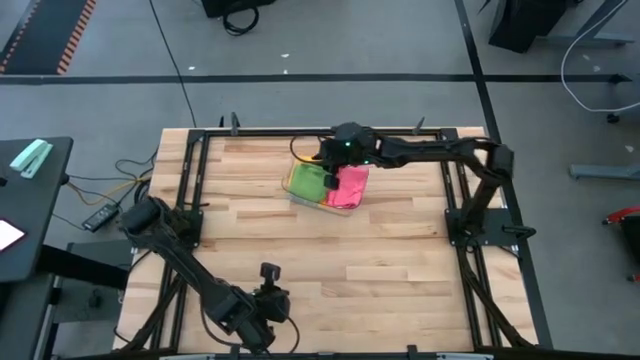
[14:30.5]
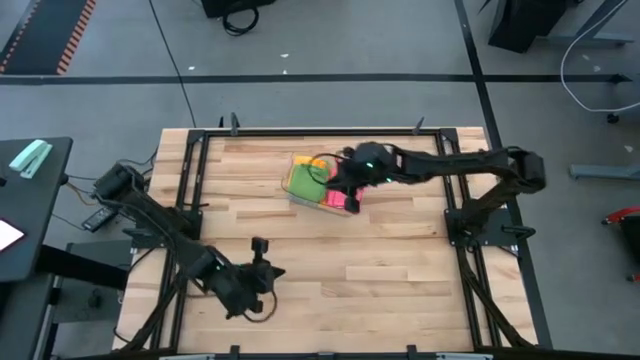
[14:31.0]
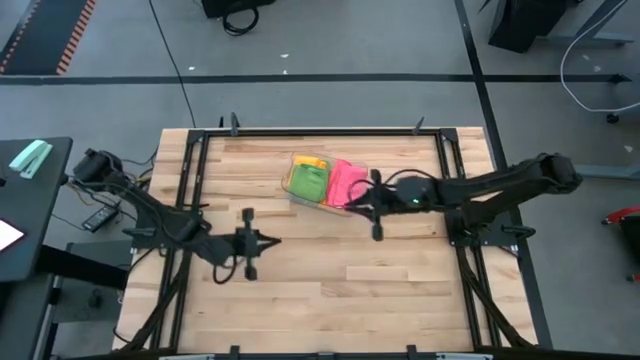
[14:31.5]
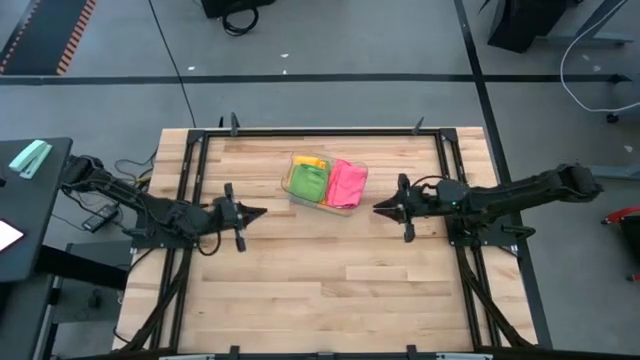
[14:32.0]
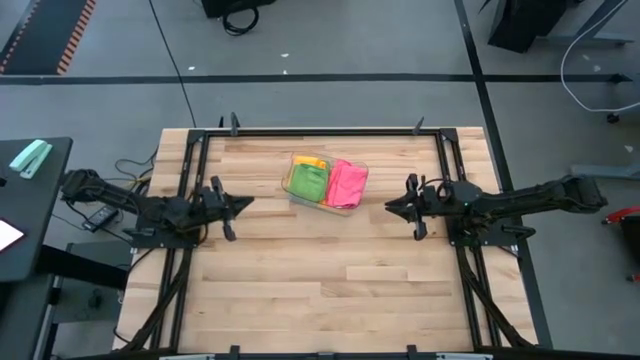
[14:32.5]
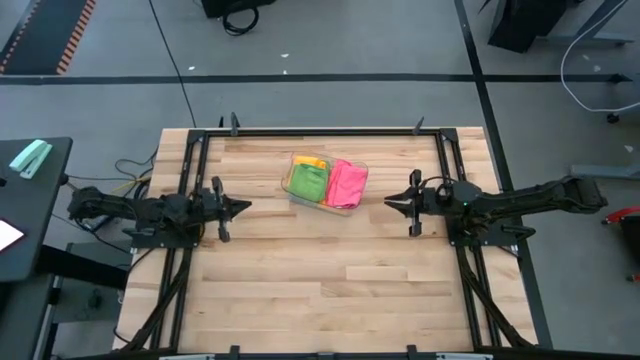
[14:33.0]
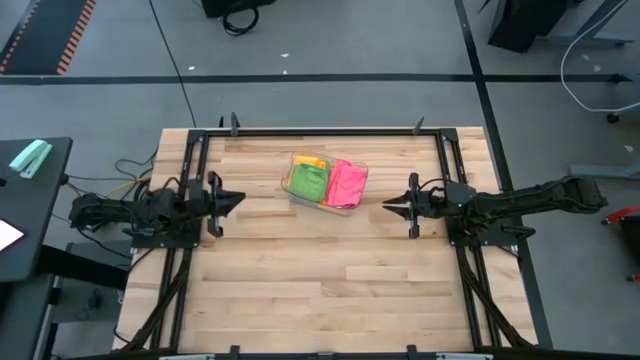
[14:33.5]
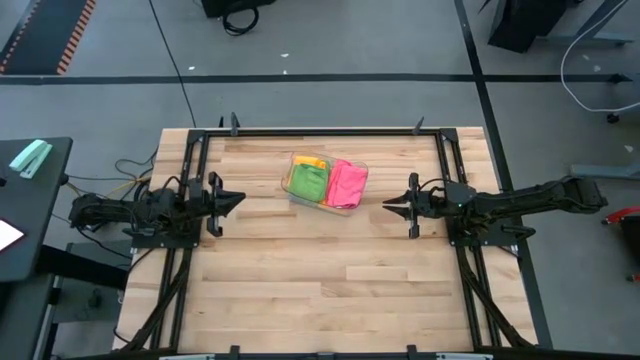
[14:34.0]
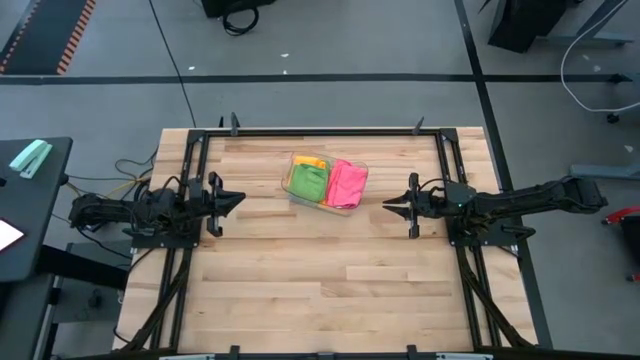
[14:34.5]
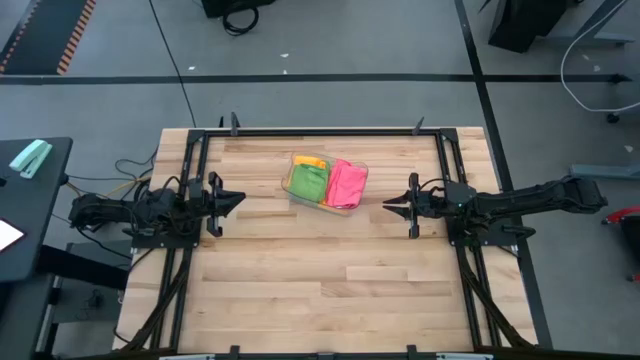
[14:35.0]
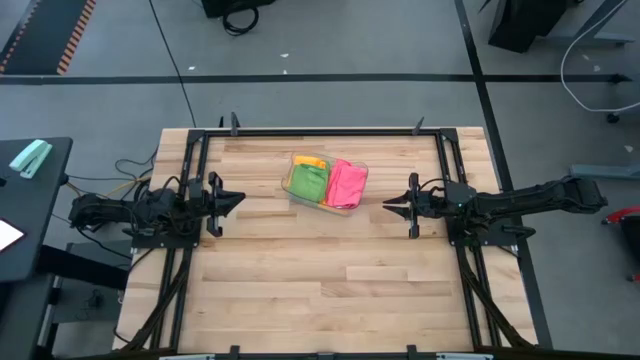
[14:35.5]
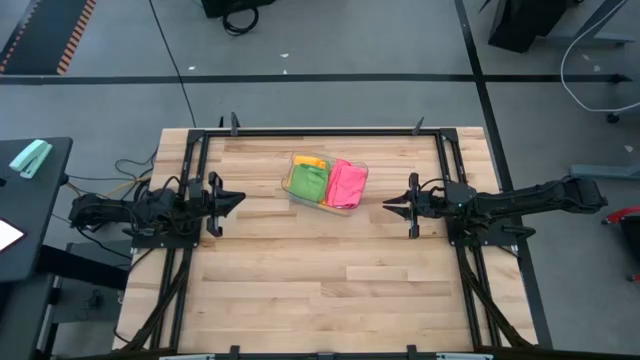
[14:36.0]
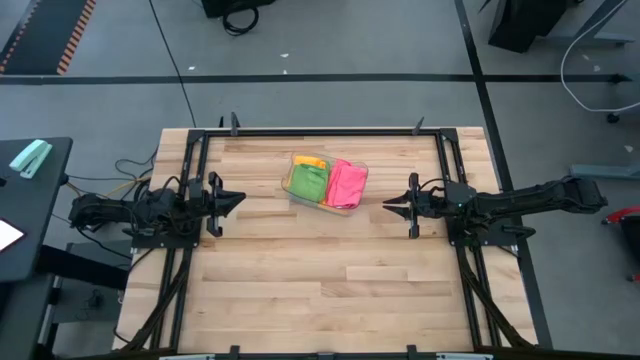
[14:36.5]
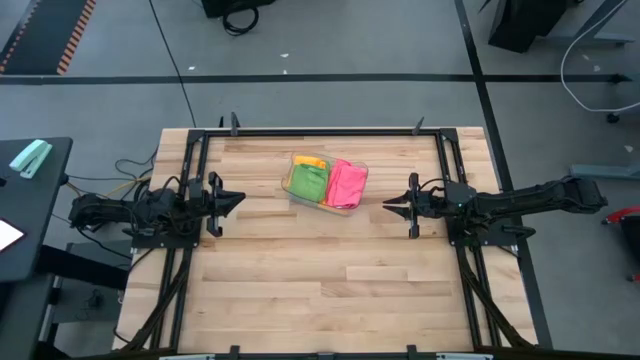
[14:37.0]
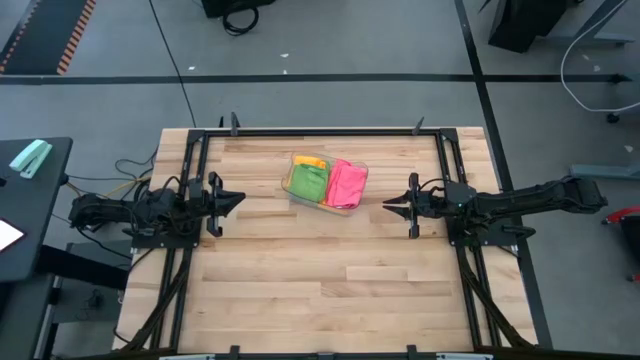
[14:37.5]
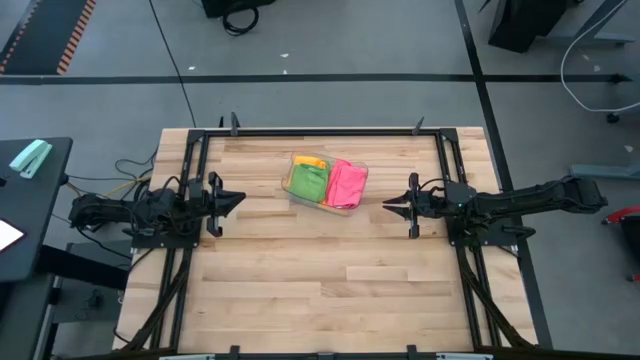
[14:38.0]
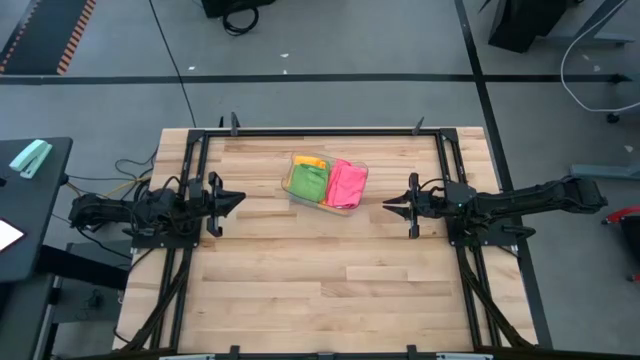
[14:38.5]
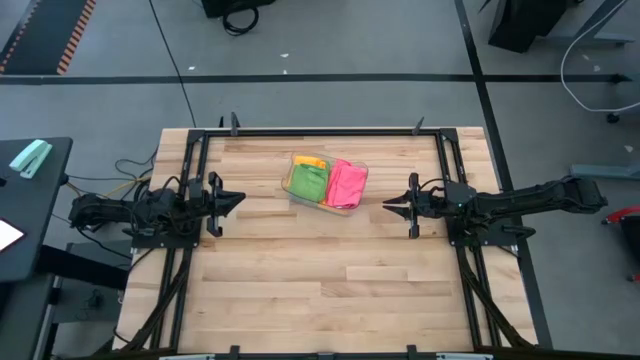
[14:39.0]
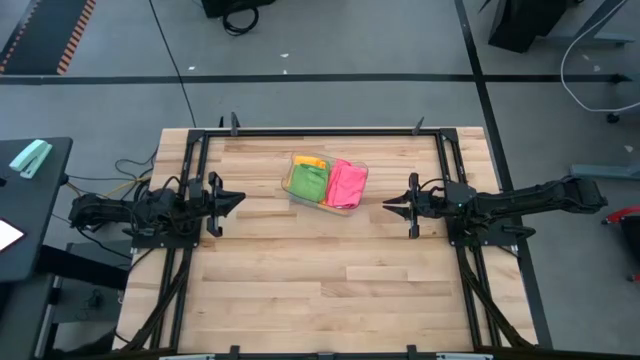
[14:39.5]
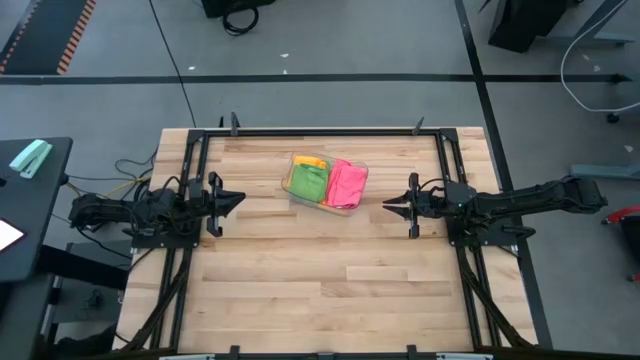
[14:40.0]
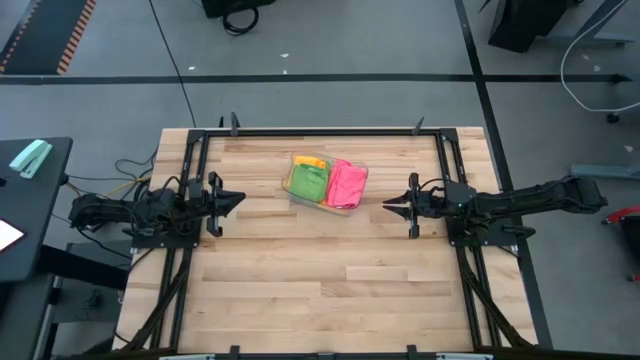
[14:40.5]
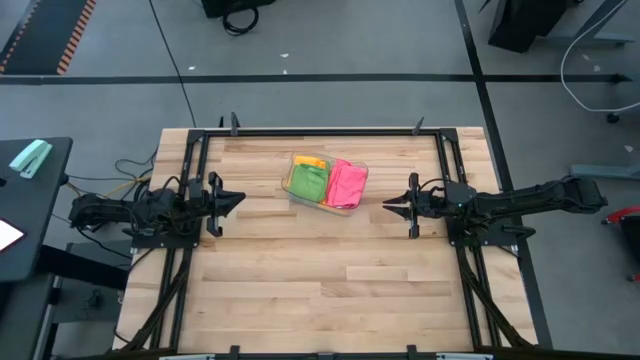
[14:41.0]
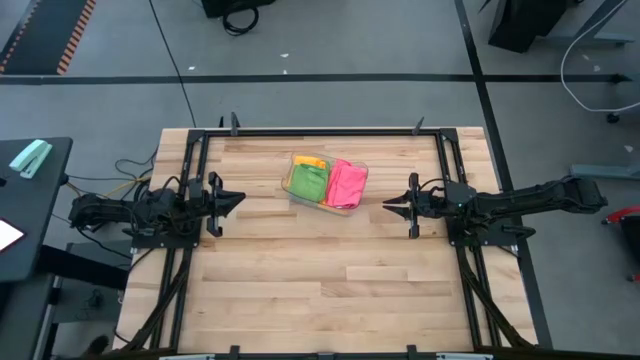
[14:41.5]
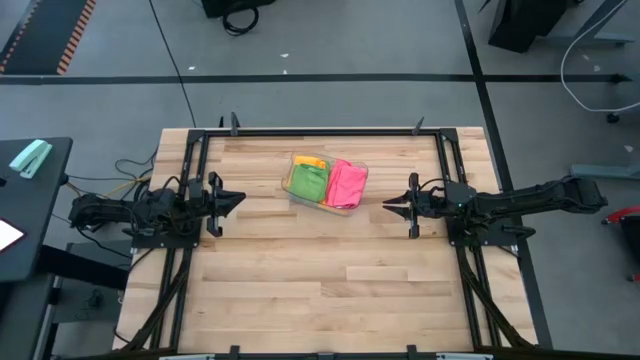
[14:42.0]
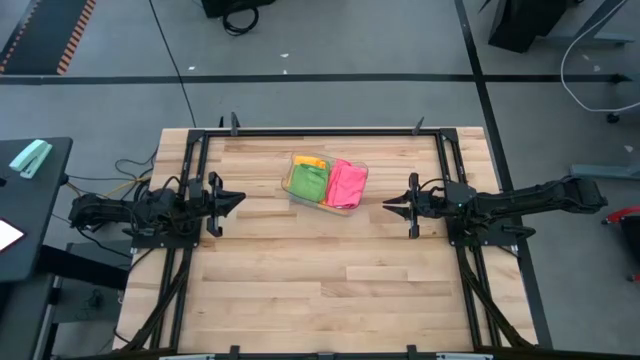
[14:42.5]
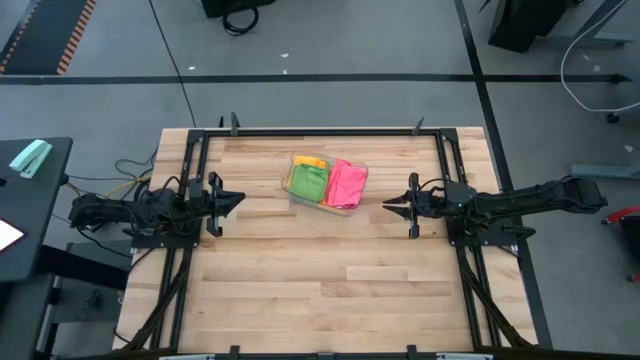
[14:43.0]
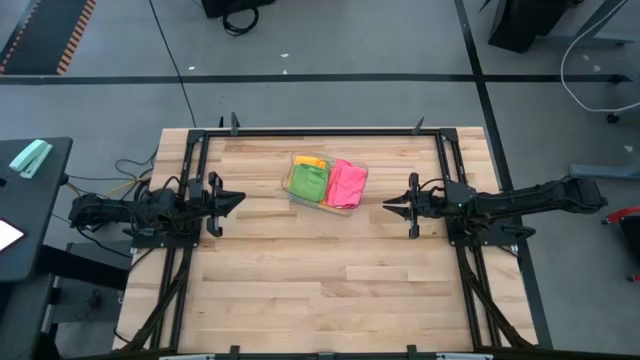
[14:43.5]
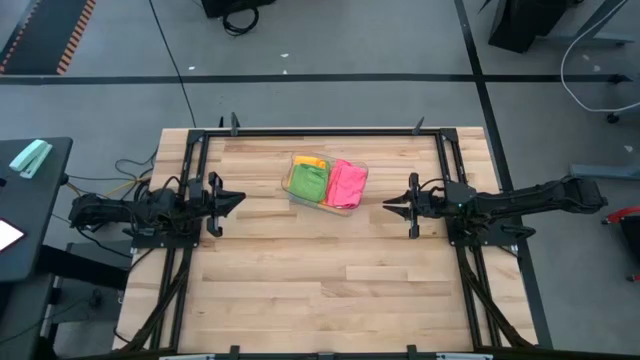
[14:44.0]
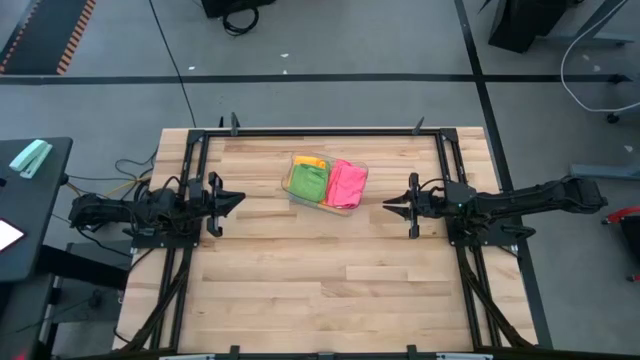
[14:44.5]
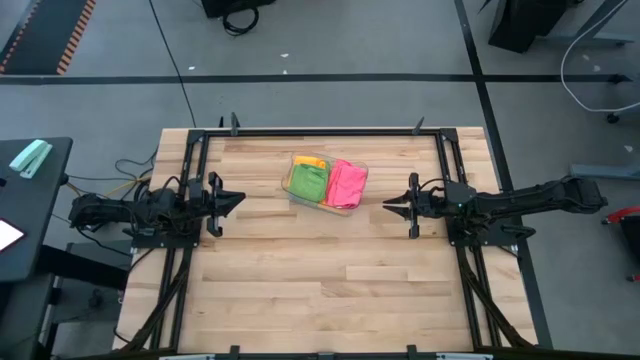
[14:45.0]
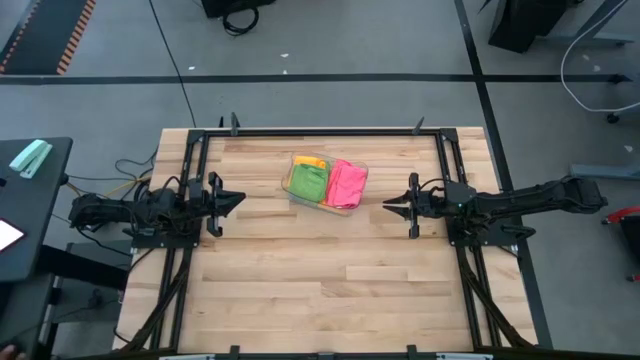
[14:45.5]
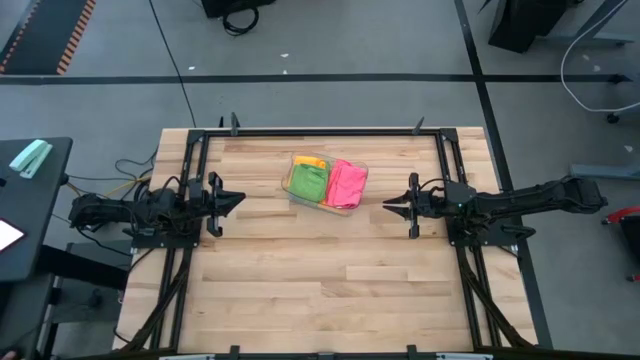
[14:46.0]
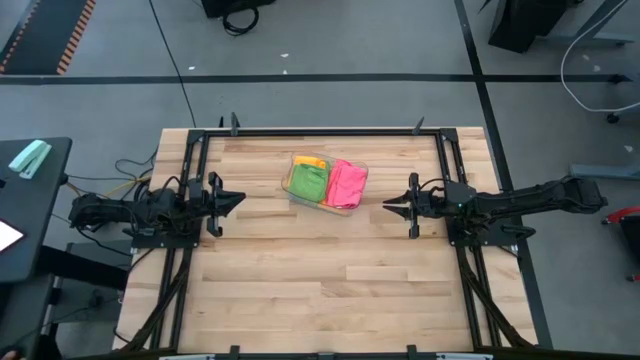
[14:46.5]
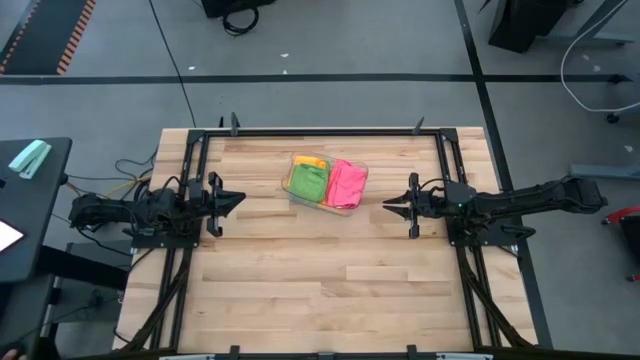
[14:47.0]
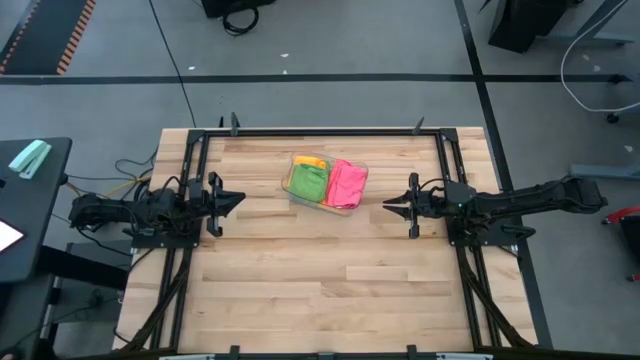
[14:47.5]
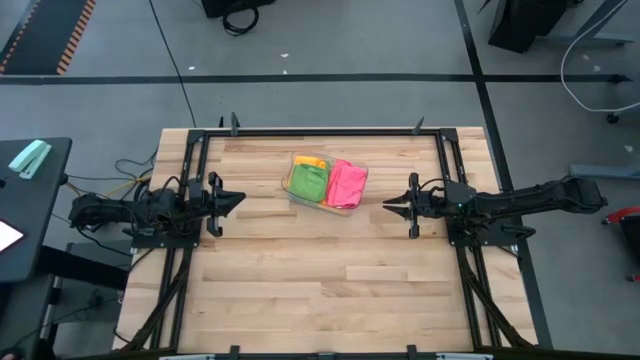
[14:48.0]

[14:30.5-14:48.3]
Task: Fold microfiber towels
Return to Home Position

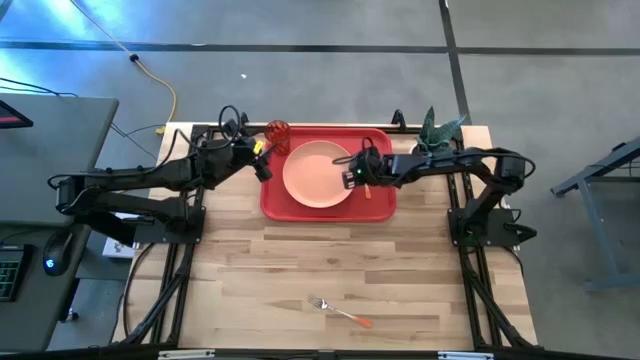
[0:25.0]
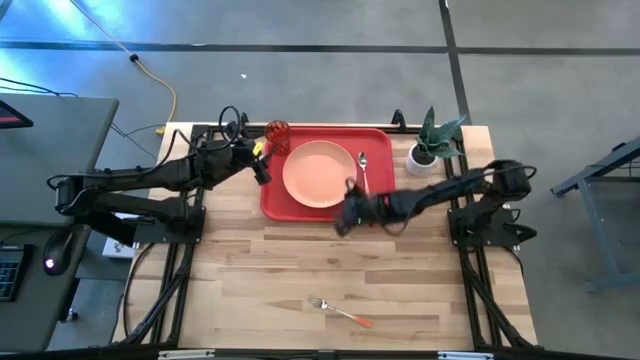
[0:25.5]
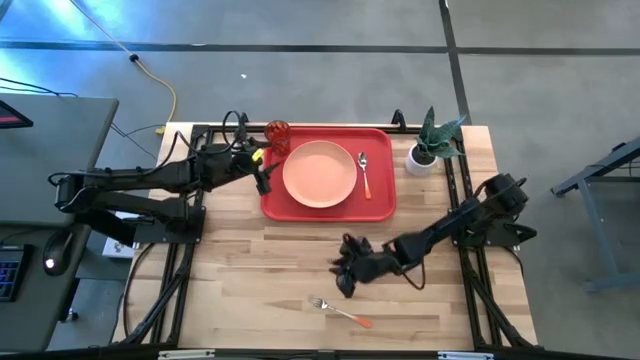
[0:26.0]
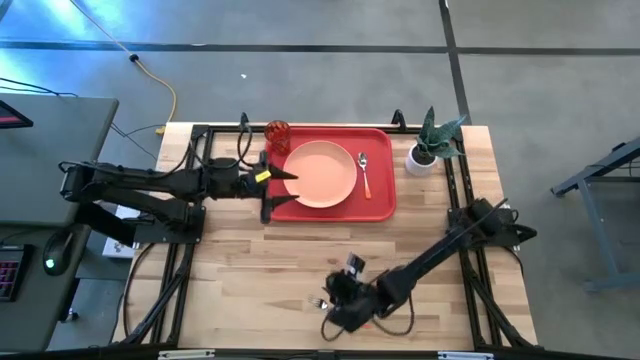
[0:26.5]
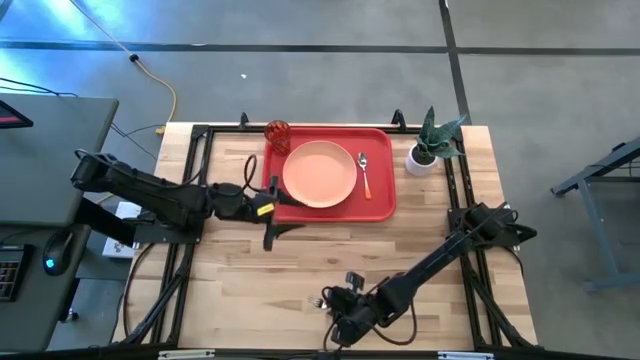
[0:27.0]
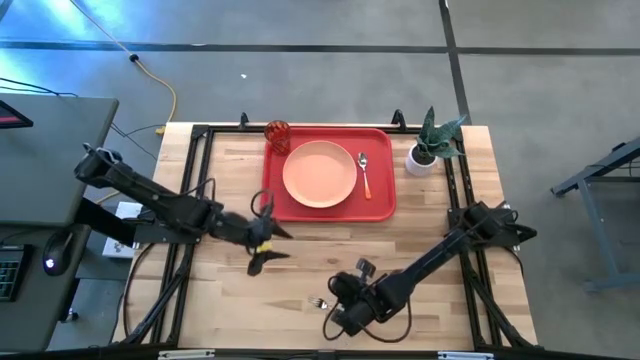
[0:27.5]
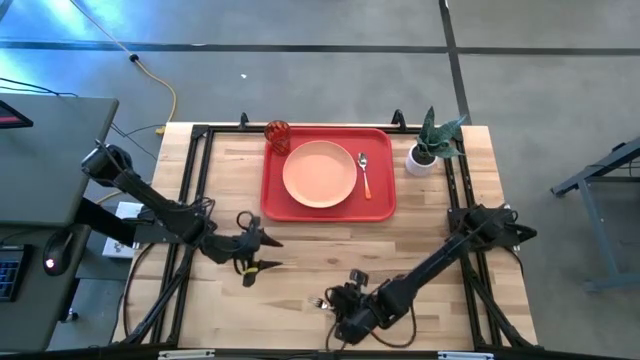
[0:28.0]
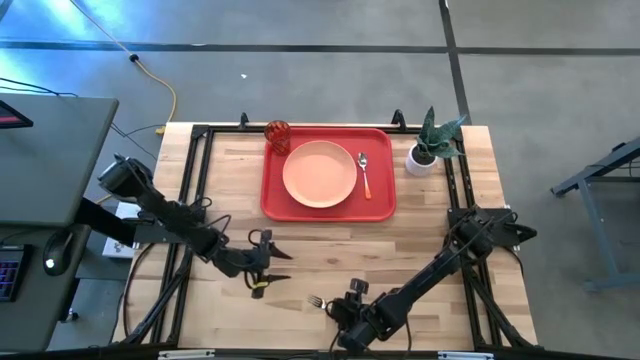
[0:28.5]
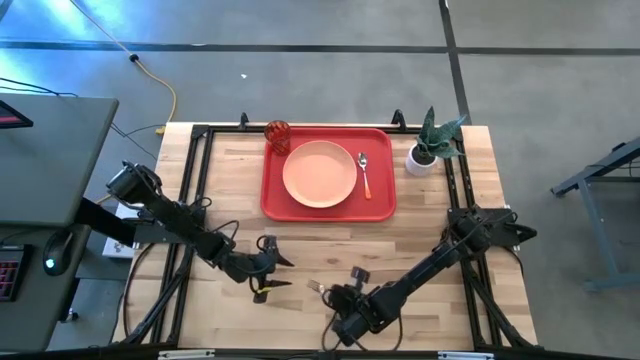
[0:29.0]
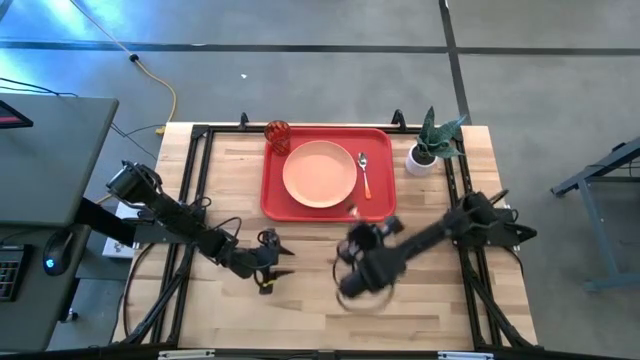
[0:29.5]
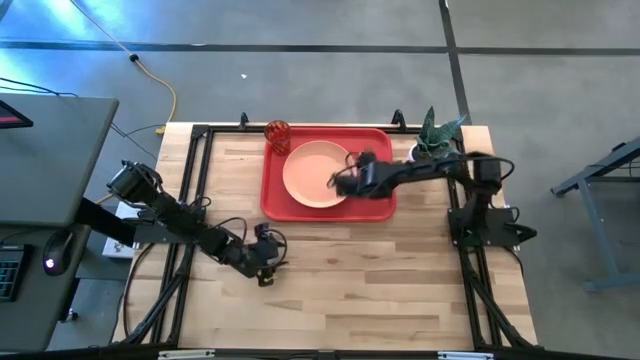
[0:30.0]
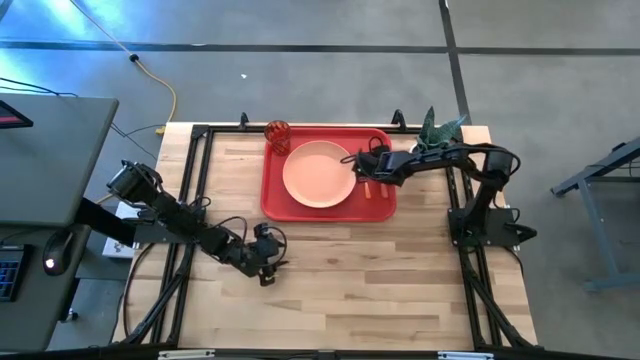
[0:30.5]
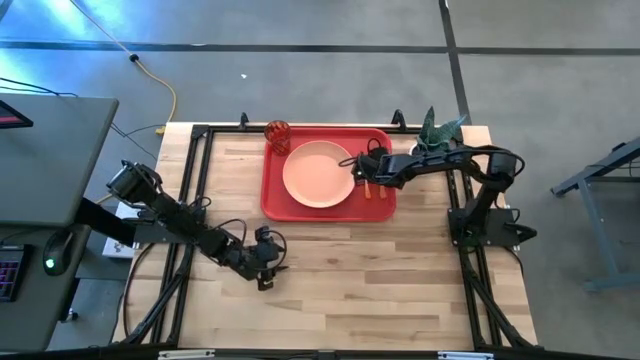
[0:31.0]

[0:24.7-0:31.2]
Task: Pick and place plate/cup/fork/spoon on tray
Put the orange fork to the right of the orange spoon on the red tray
